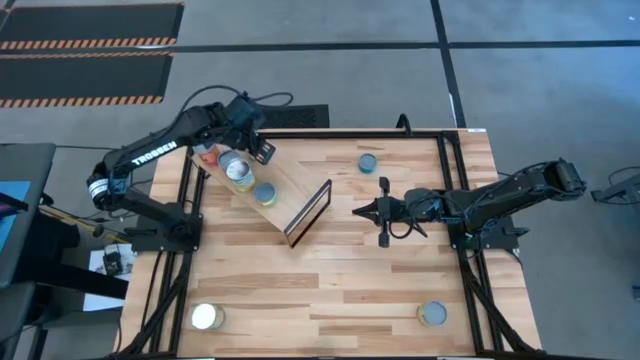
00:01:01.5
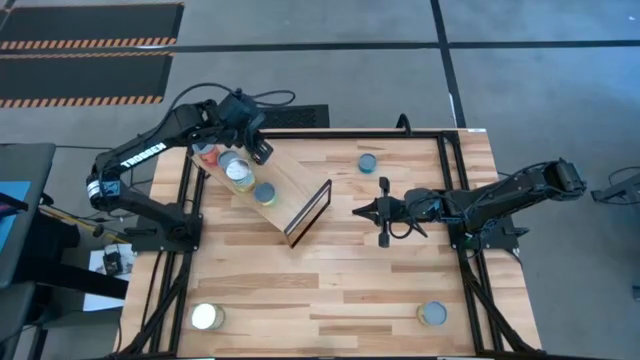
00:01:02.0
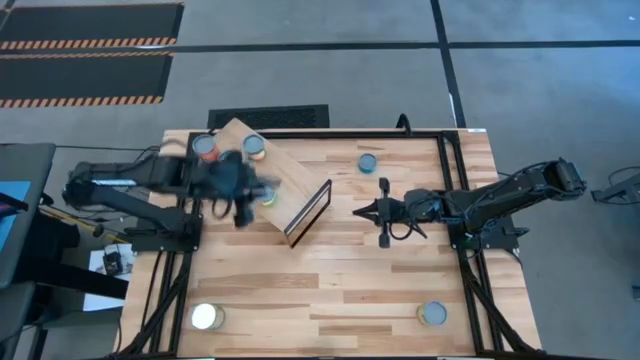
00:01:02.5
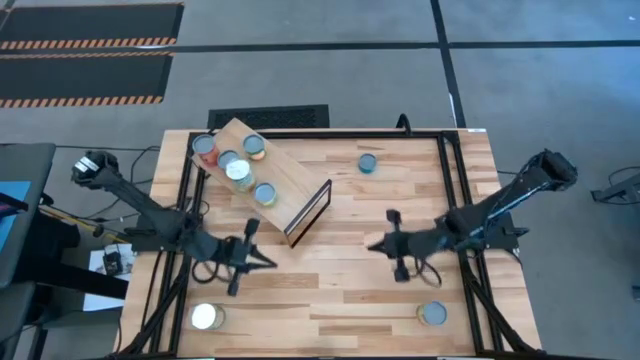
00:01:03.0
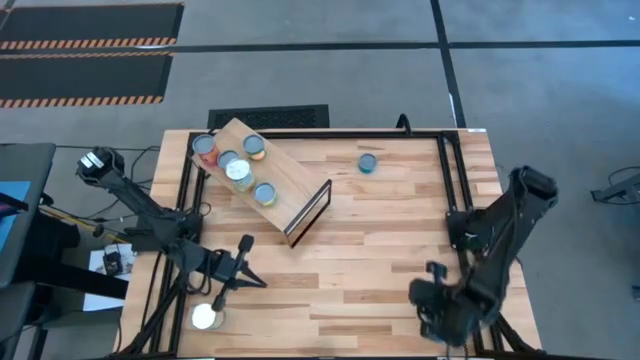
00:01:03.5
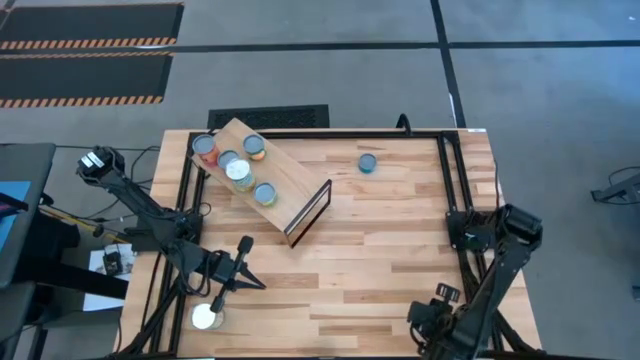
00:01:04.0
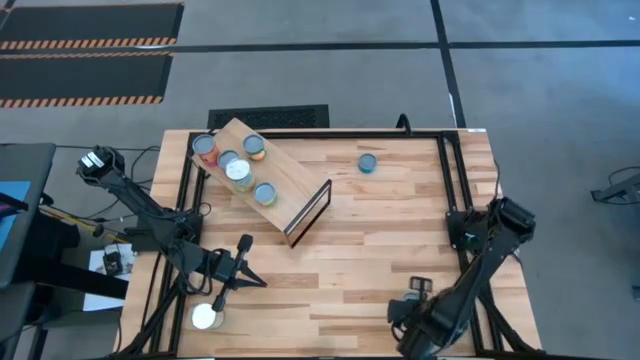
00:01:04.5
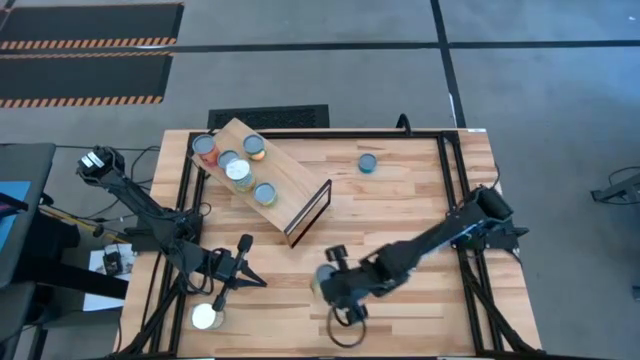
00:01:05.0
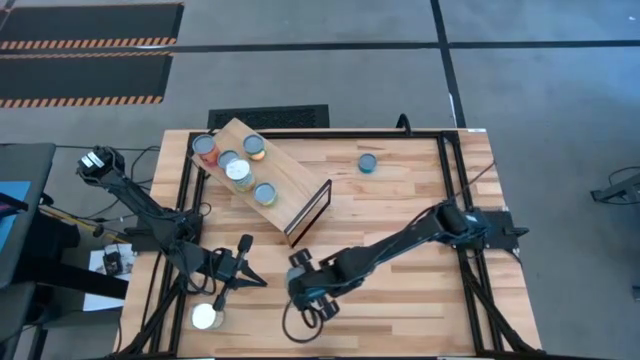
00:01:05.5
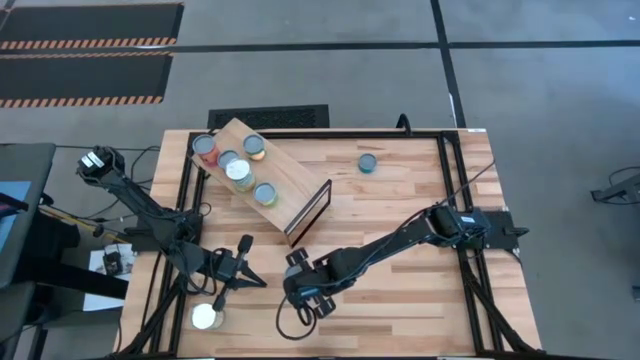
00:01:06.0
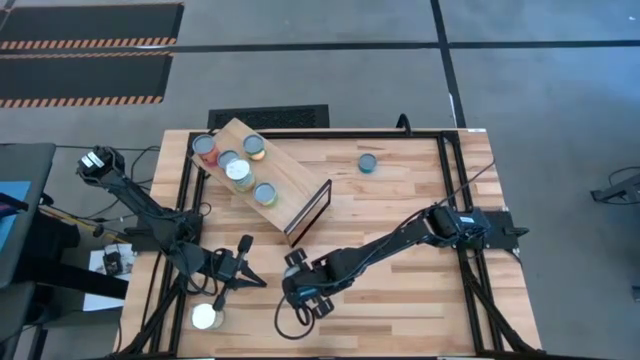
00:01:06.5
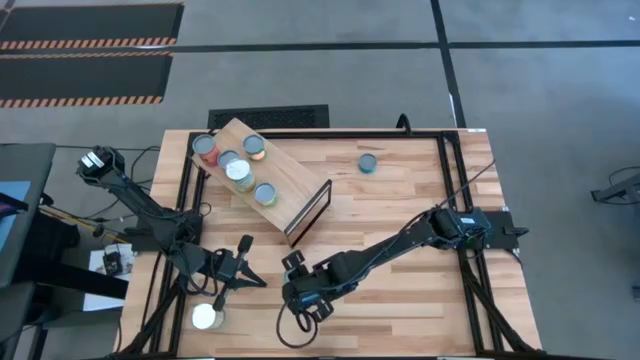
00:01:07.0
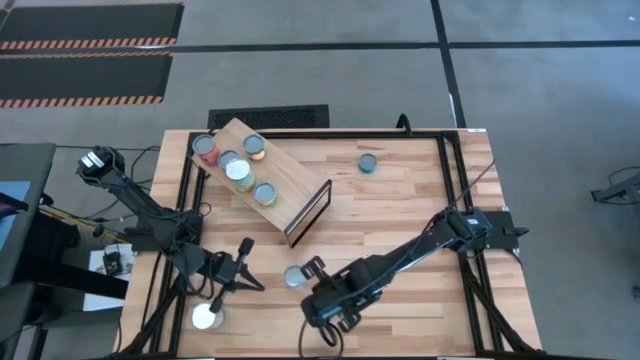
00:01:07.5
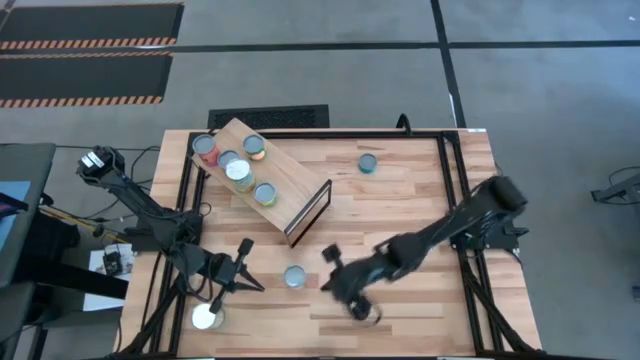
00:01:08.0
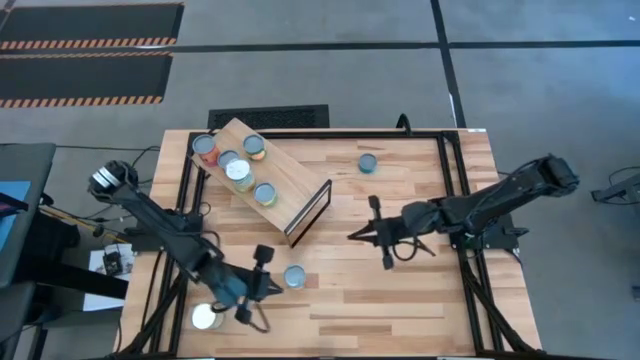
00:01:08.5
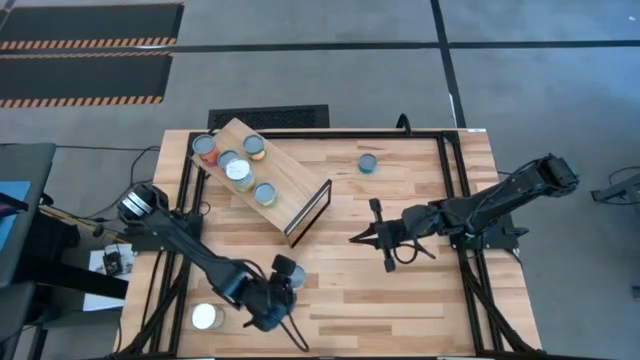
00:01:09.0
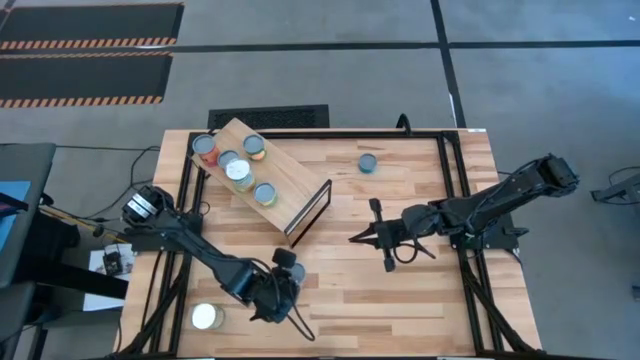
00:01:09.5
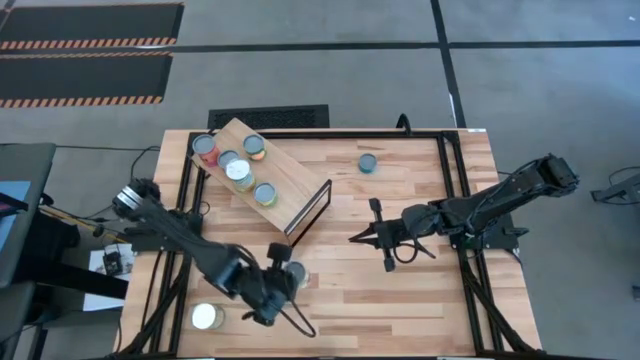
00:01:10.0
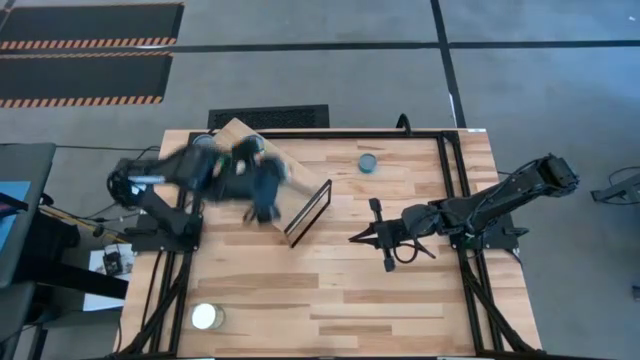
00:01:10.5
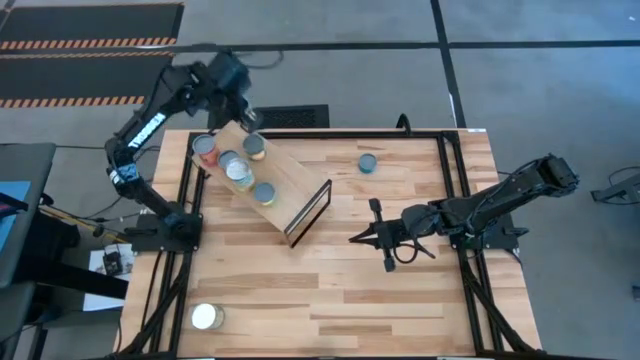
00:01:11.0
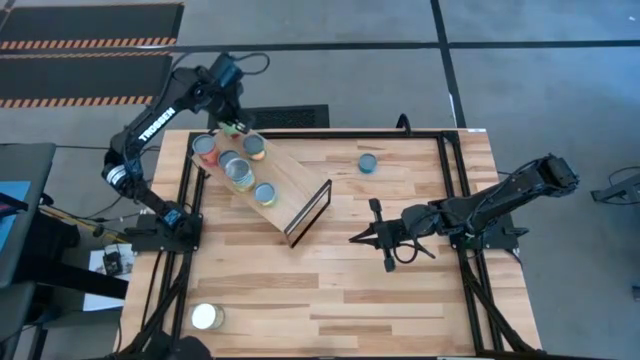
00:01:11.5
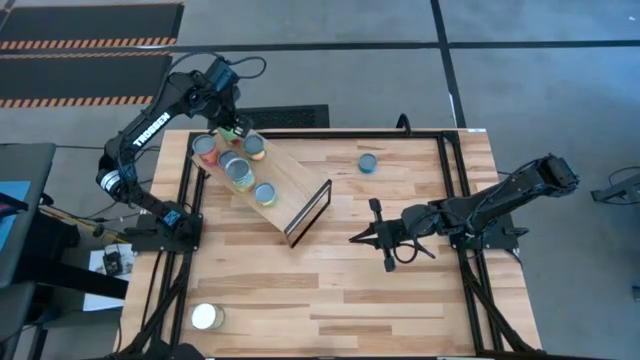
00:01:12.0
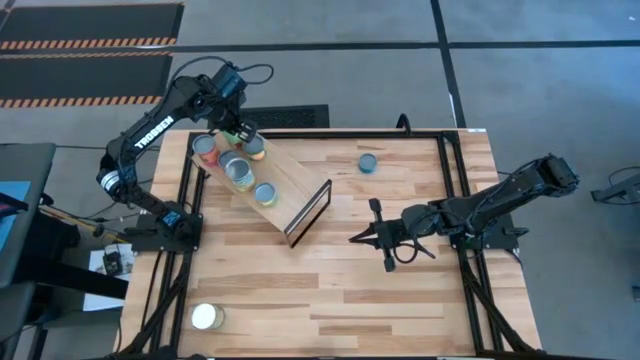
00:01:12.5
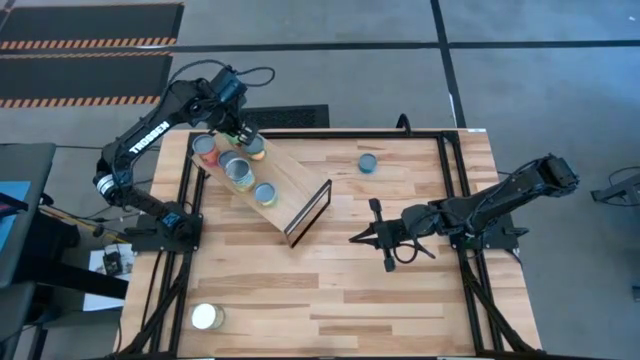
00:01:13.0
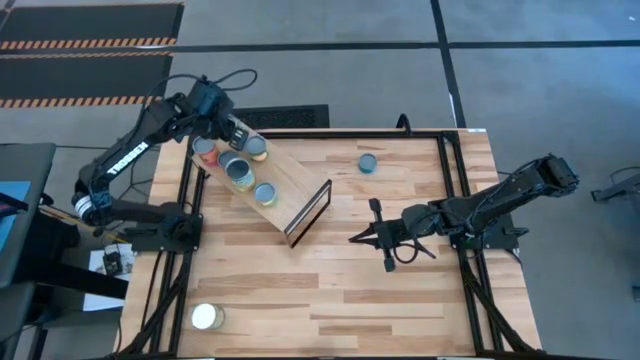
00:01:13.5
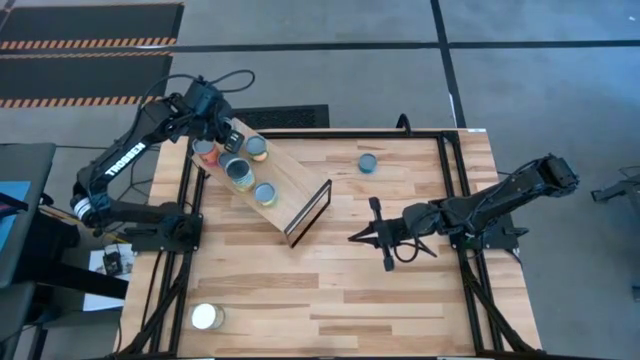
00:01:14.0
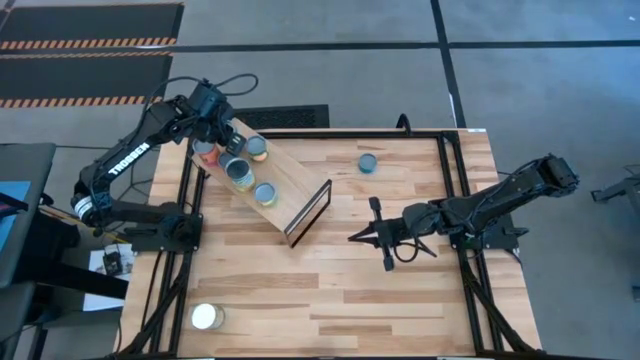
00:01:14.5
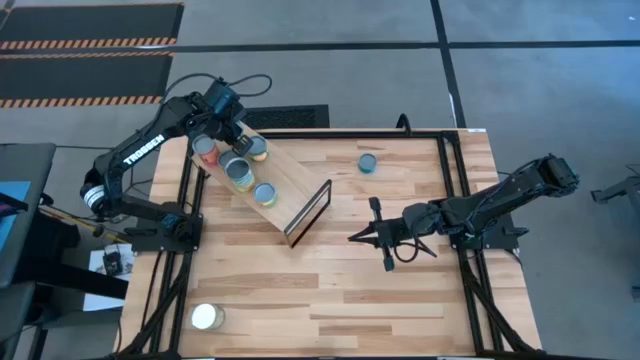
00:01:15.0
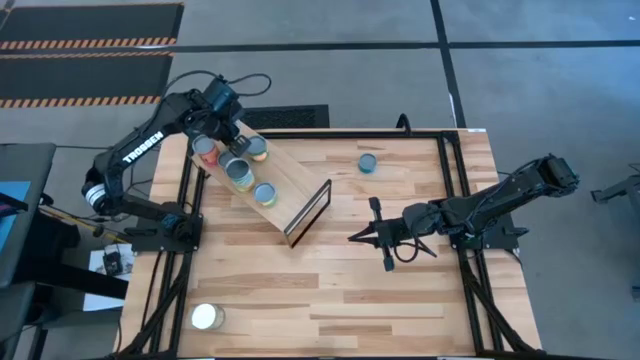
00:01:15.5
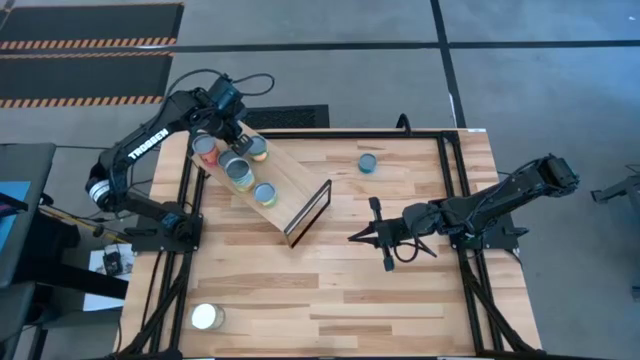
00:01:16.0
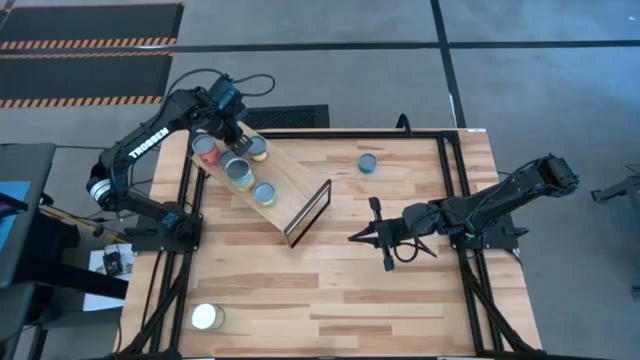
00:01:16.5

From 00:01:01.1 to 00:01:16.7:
Task: Pick and place cans onto a shelf
Put the canned spaghetti sauce on the shelf

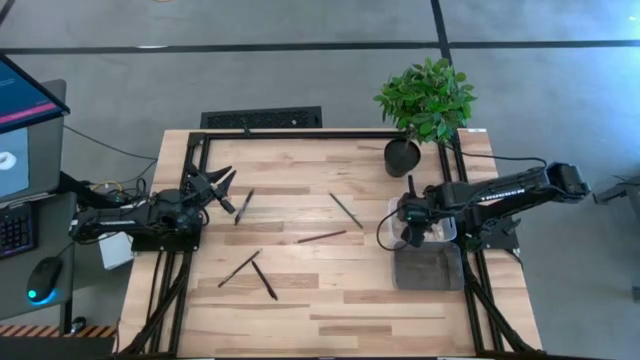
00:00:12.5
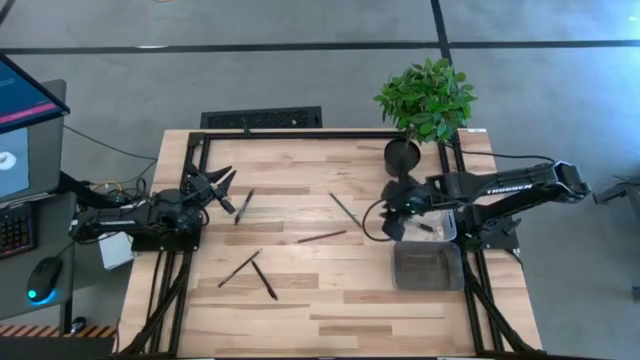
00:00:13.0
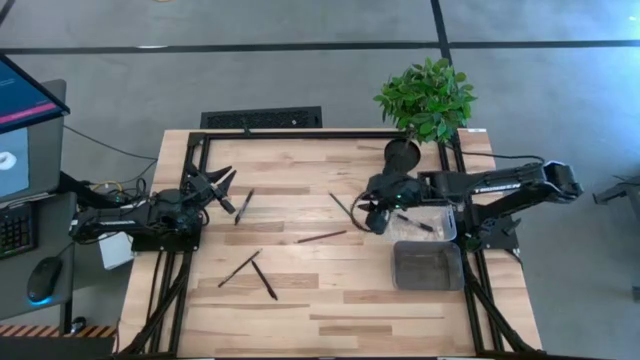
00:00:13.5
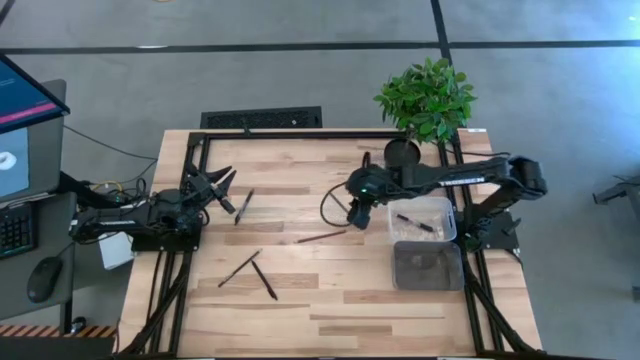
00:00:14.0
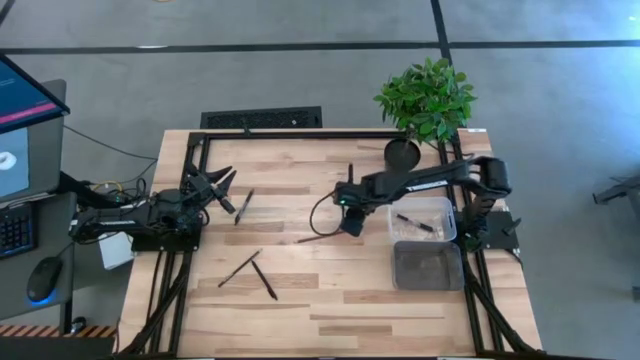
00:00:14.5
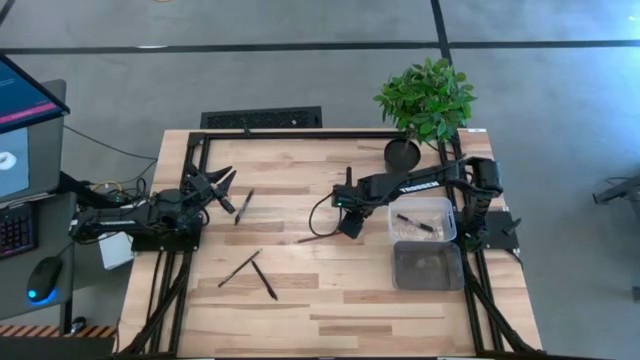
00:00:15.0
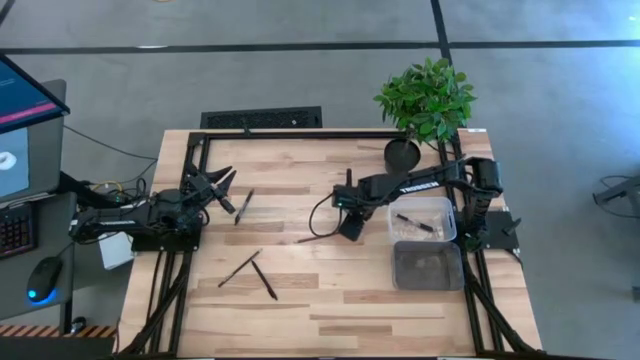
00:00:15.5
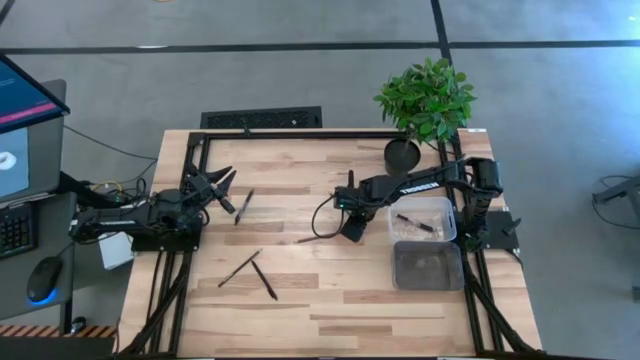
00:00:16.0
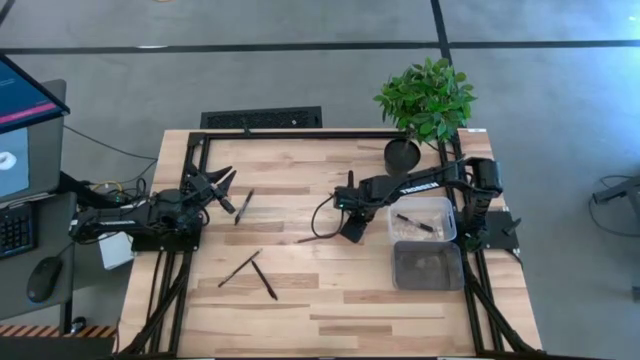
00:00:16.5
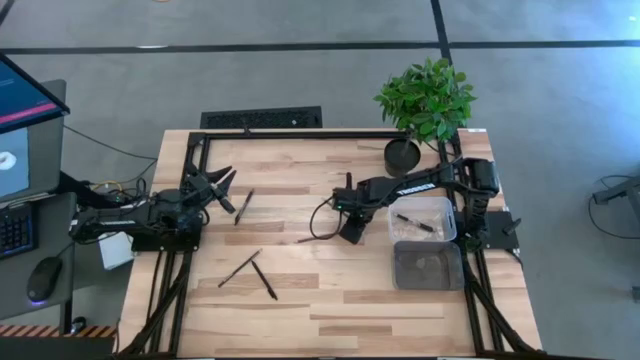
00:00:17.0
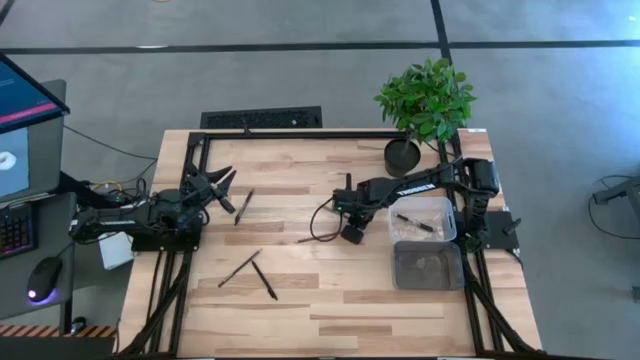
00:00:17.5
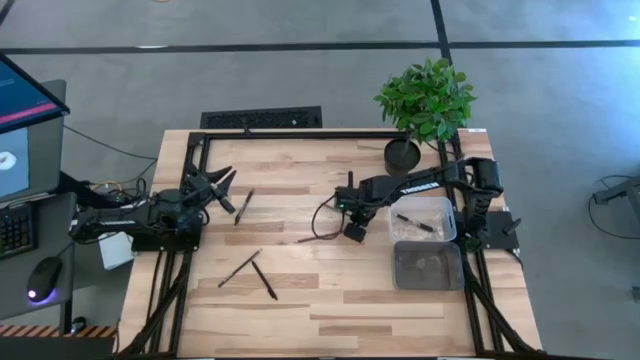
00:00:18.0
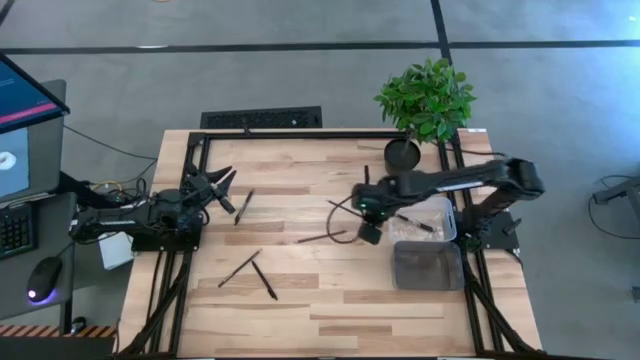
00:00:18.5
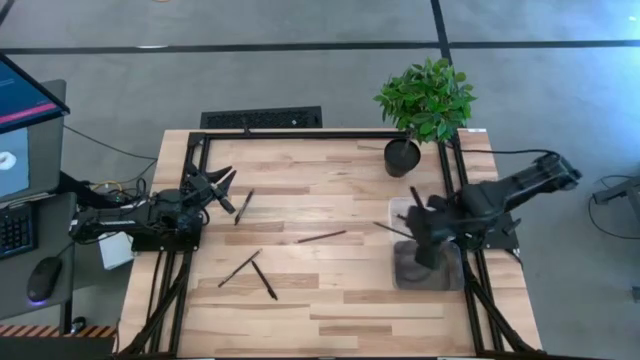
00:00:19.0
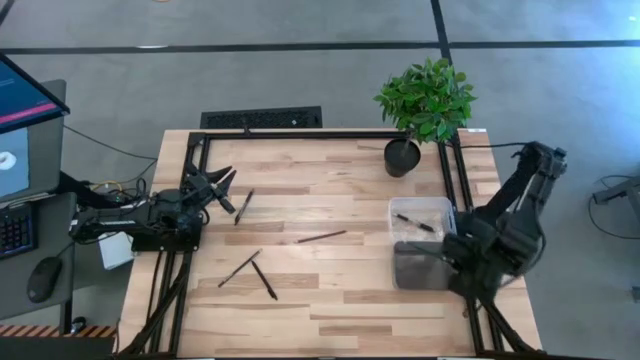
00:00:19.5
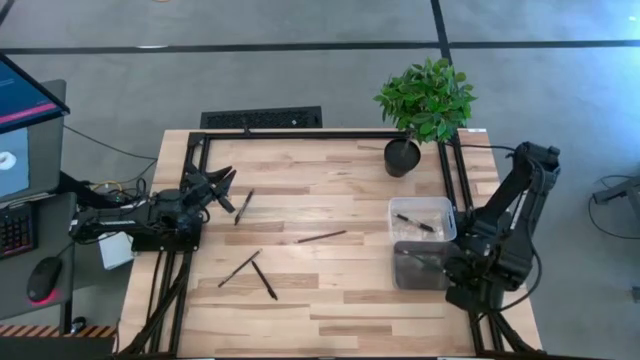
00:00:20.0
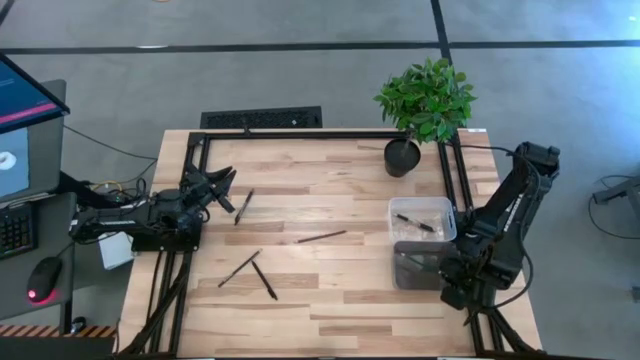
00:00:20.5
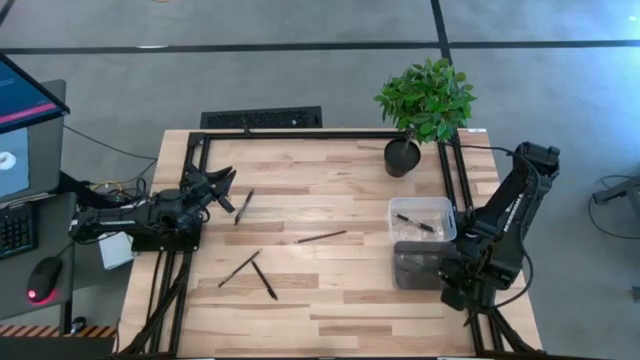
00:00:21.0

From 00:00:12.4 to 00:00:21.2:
Task: Sort pens & pencils
Put the dark green pencil into the black transparent bin
